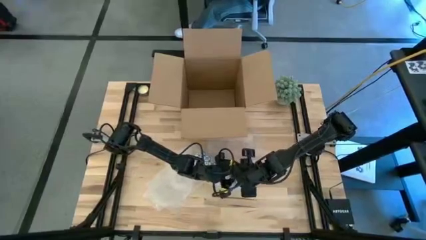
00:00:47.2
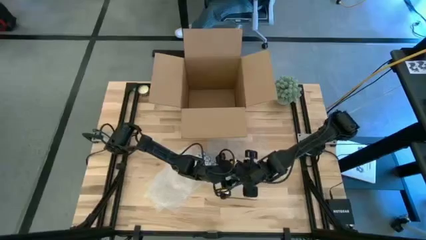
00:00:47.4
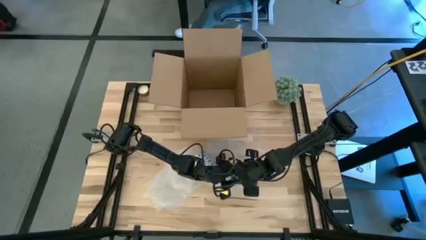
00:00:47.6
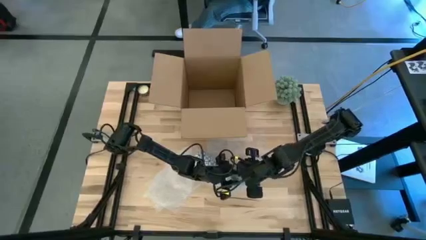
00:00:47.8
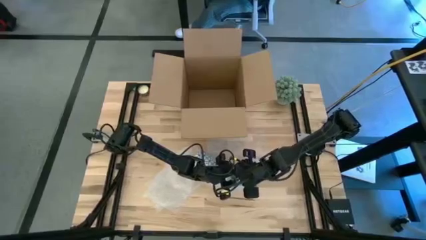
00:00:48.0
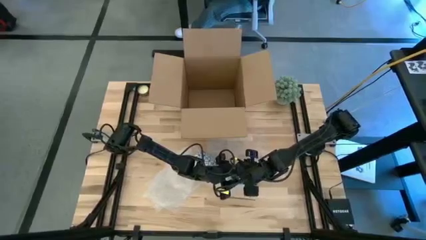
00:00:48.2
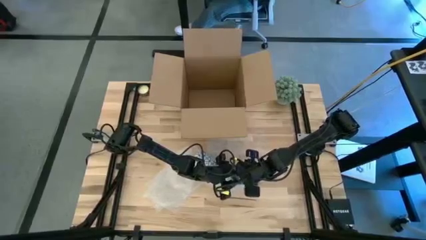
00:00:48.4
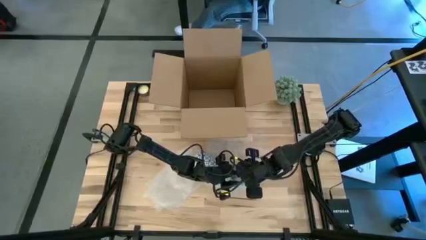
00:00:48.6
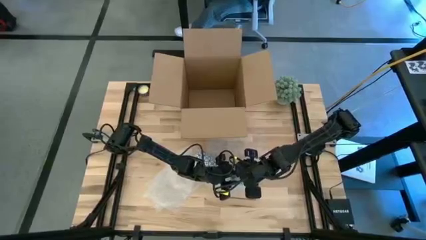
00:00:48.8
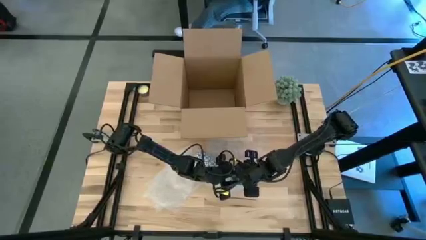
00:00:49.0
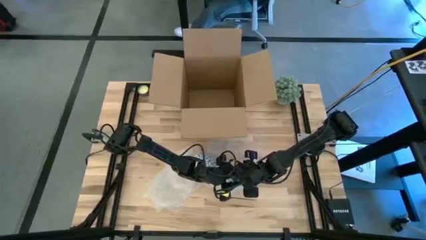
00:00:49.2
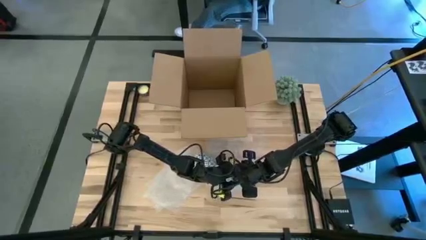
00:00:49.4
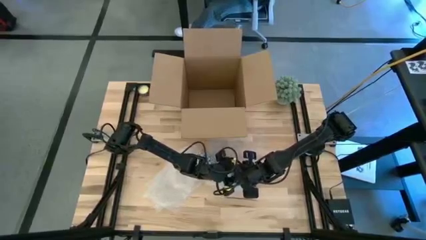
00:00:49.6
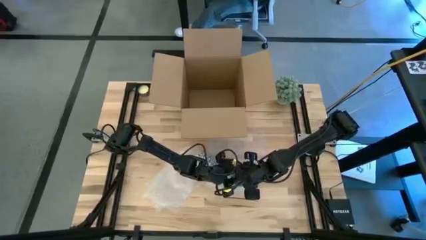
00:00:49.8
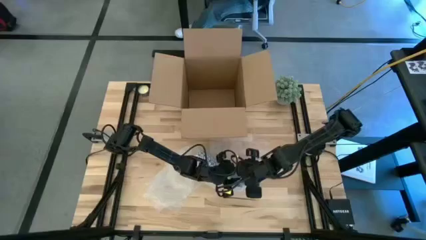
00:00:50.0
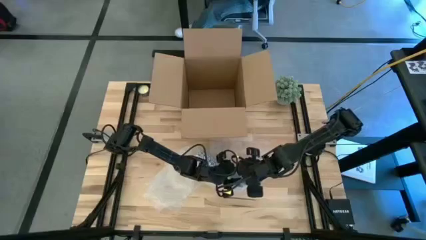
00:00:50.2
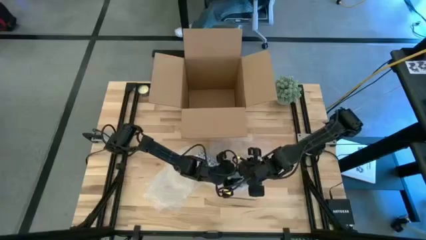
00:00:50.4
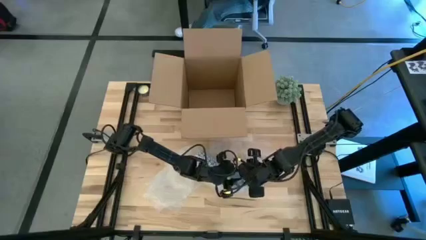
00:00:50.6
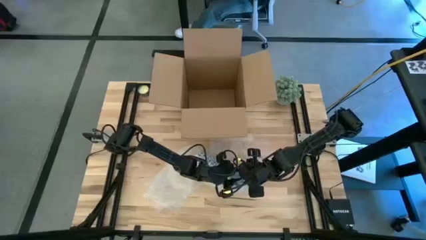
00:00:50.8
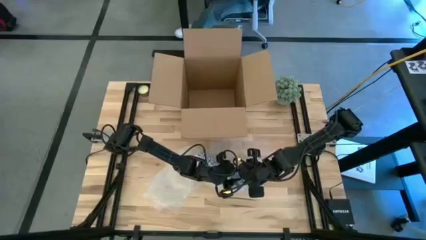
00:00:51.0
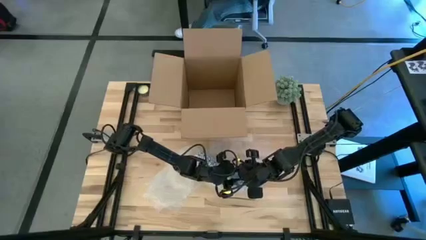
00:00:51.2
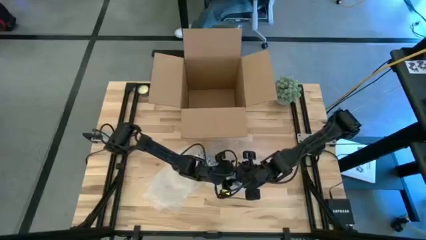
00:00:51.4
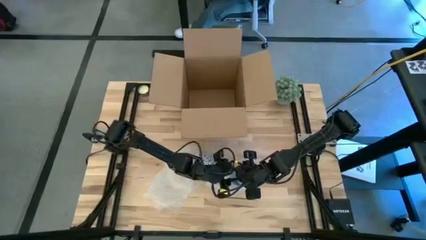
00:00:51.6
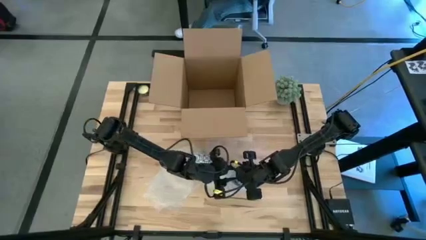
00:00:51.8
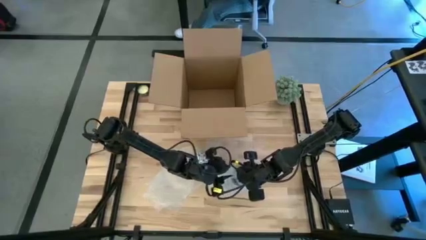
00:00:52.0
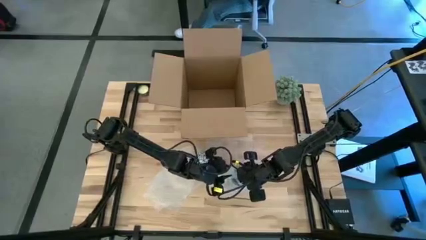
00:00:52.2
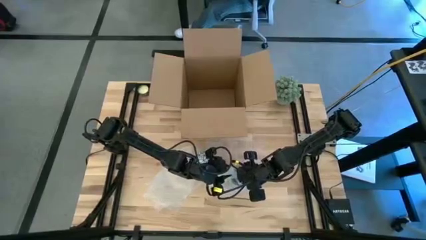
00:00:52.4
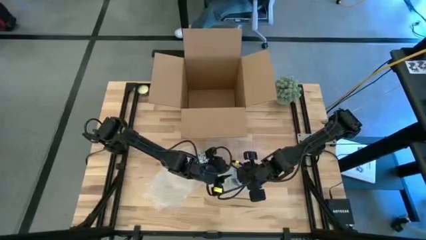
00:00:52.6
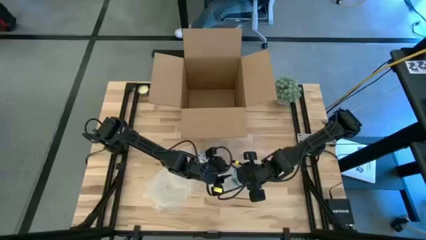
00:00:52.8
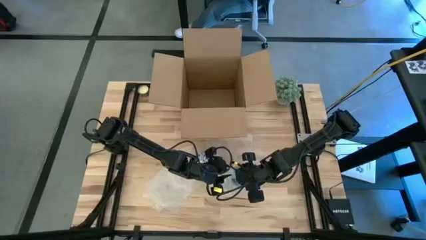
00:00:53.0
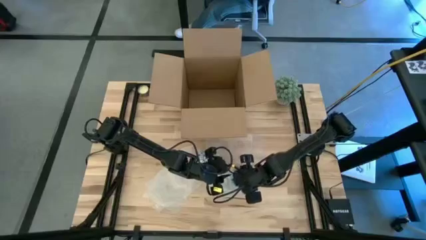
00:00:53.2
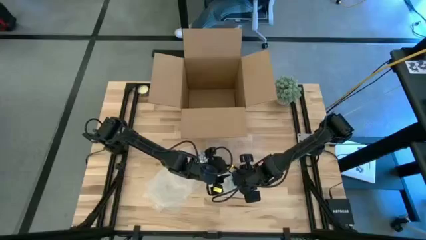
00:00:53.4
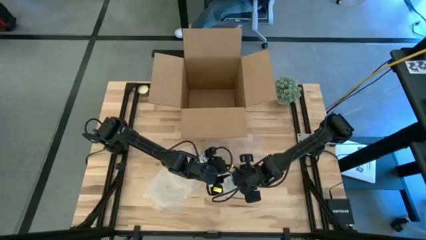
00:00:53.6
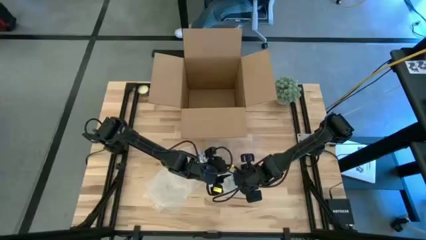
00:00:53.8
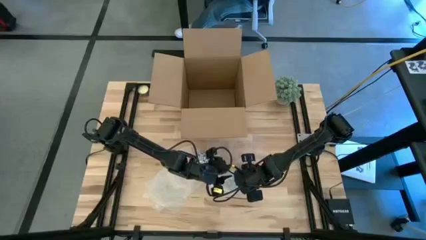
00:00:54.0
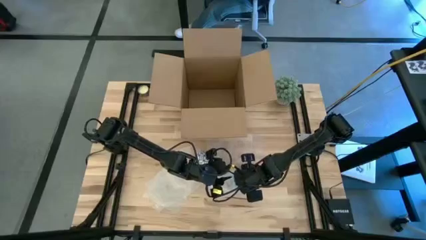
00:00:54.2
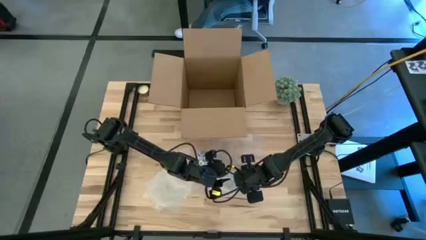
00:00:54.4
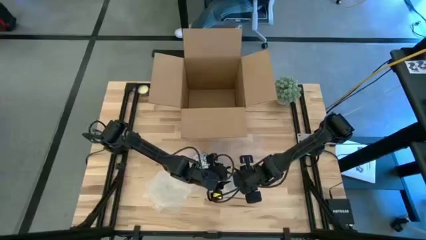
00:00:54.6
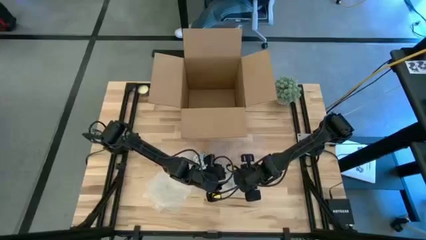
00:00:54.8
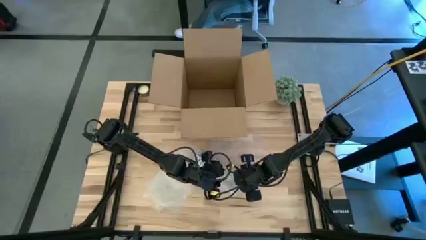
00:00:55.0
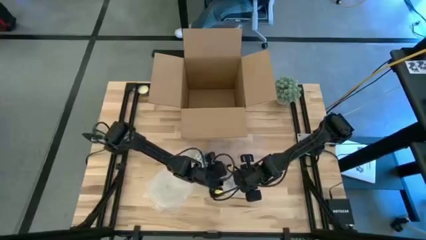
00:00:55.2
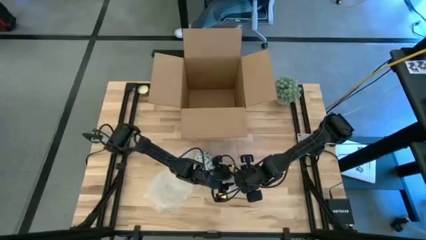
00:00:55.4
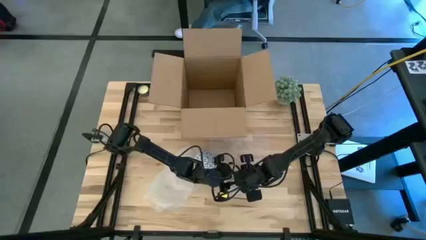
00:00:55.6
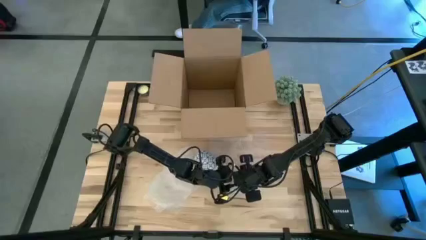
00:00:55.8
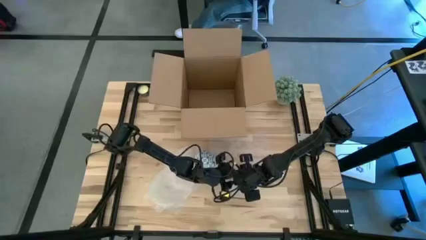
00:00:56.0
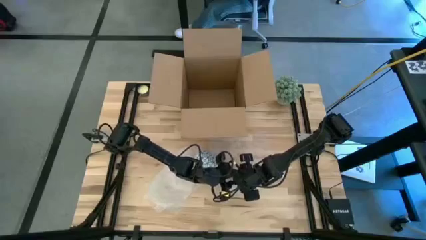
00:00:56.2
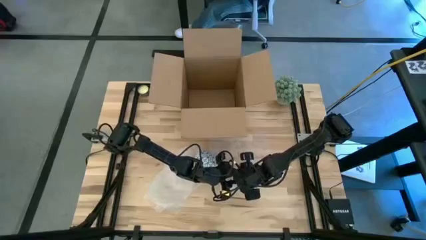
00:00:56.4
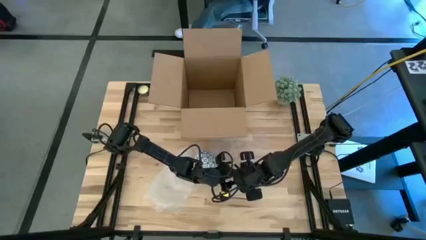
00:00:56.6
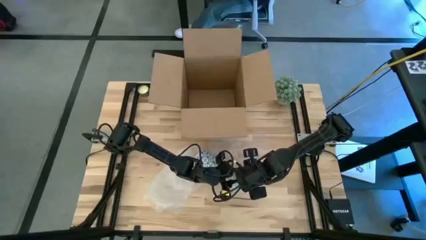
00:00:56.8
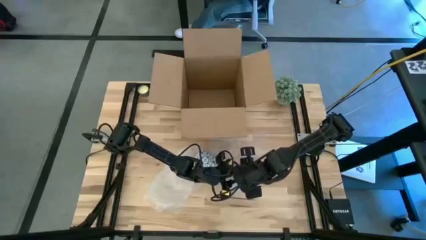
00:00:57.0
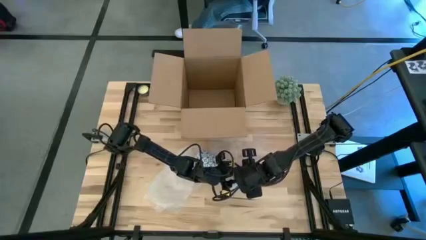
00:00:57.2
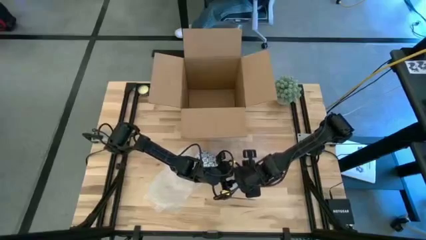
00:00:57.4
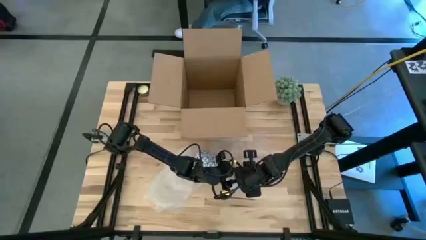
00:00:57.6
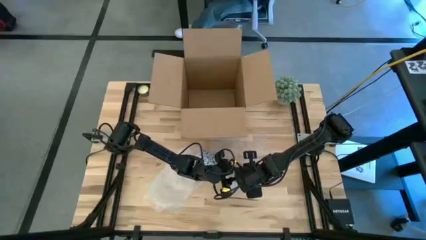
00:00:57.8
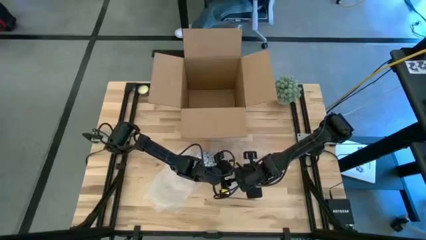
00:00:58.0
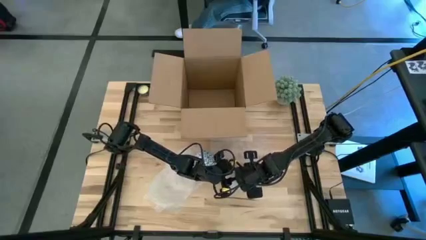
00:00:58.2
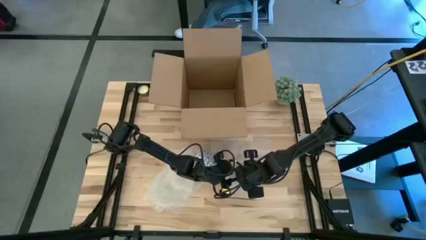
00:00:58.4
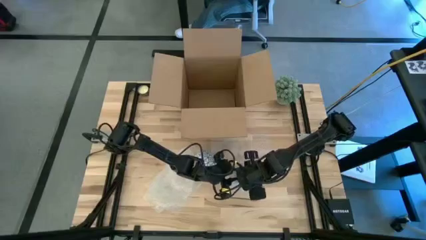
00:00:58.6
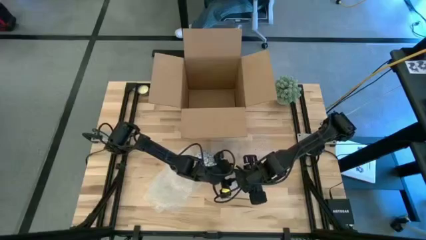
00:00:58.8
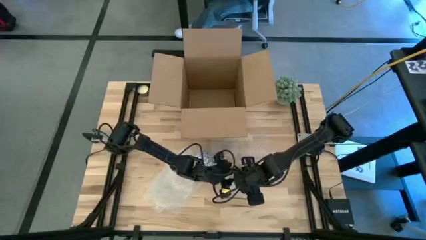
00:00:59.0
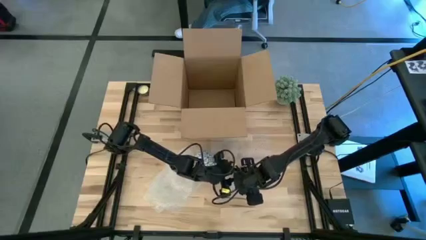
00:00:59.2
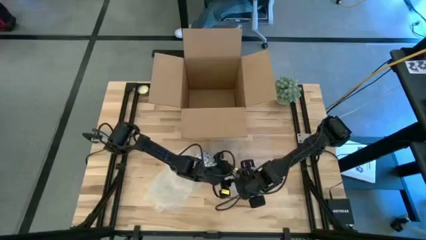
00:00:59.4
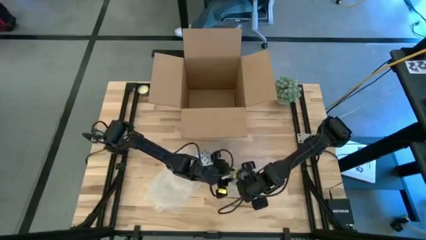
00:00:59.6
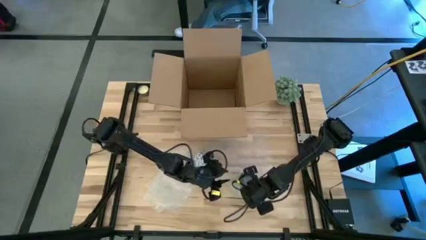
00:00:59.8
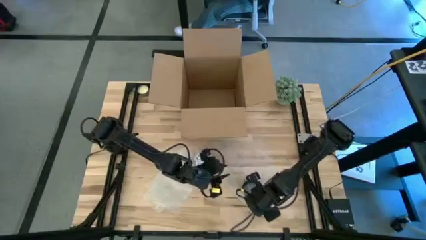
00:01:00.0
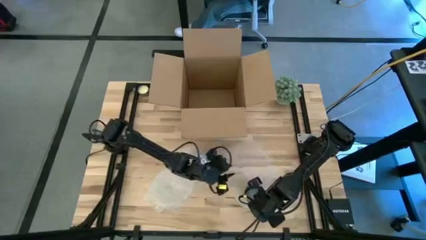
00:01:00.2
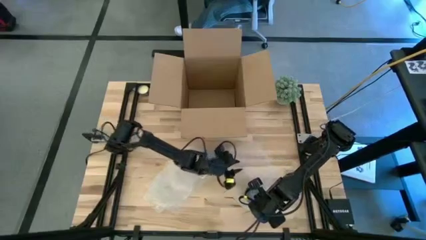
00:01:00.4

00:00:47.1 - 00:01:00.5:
Task: wrap mug
Wrap the green mug with the right transparent bubble wrap

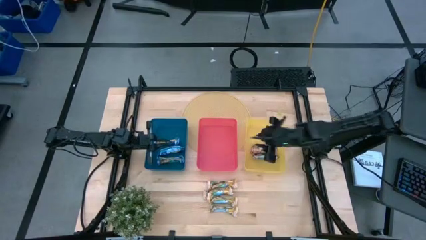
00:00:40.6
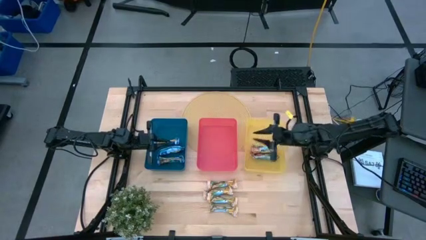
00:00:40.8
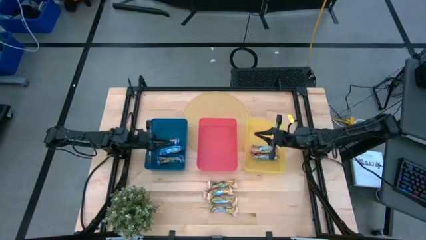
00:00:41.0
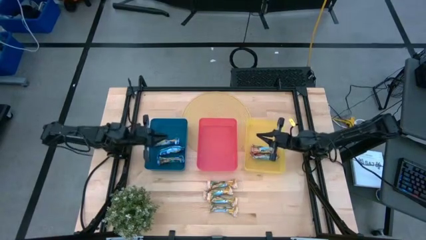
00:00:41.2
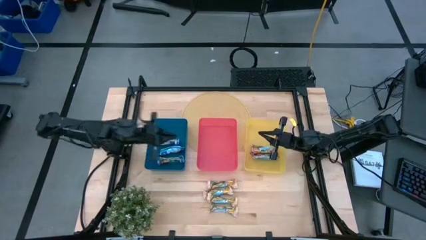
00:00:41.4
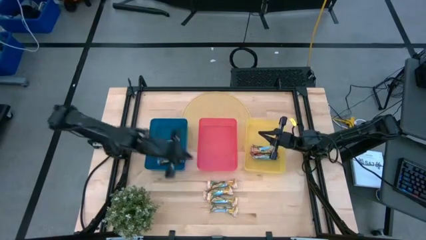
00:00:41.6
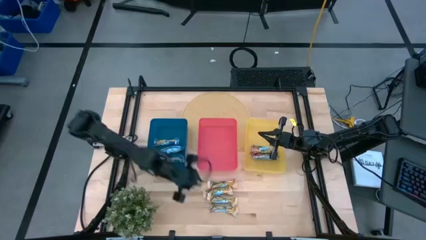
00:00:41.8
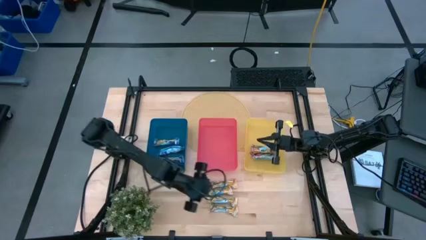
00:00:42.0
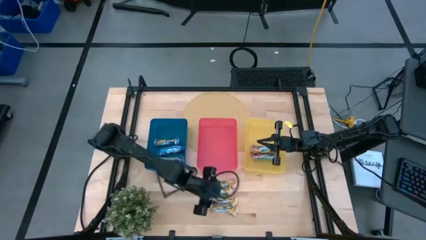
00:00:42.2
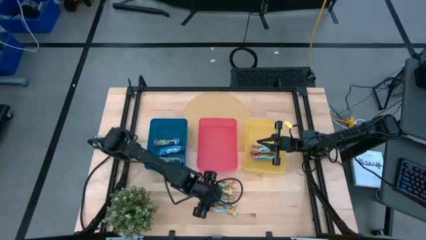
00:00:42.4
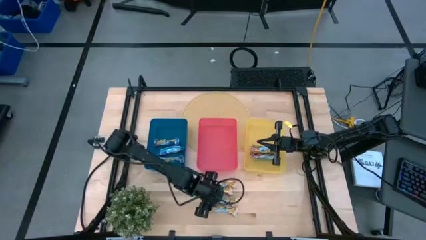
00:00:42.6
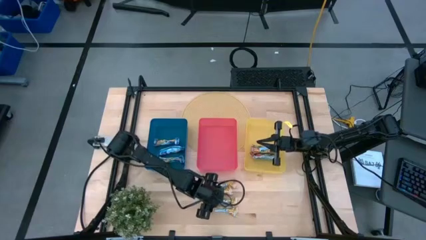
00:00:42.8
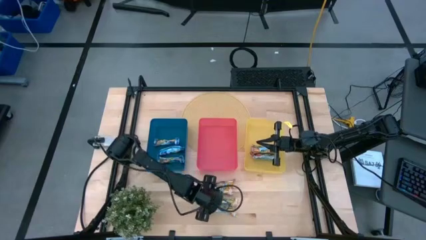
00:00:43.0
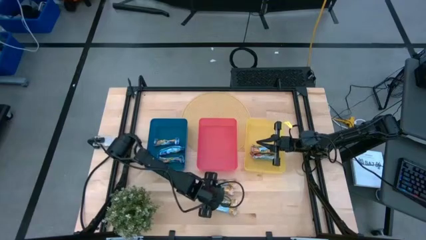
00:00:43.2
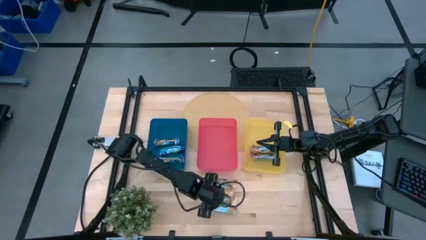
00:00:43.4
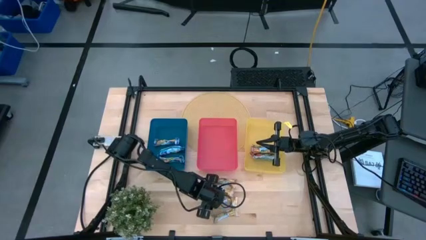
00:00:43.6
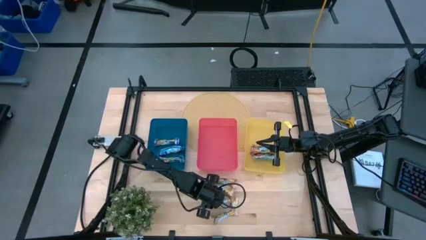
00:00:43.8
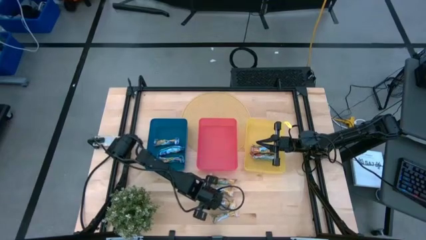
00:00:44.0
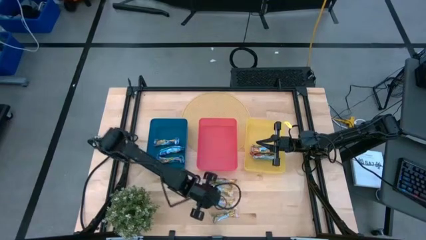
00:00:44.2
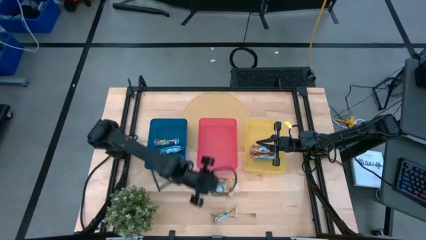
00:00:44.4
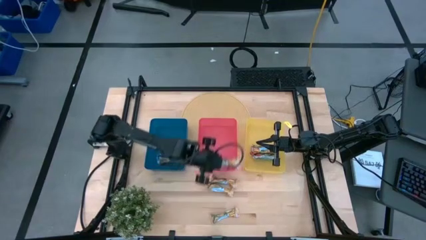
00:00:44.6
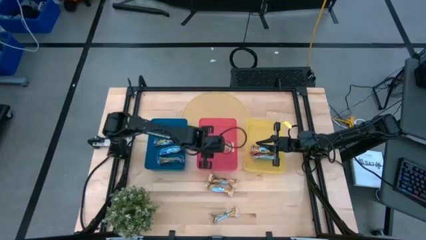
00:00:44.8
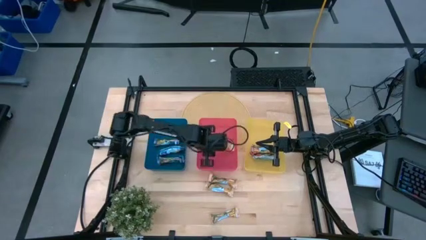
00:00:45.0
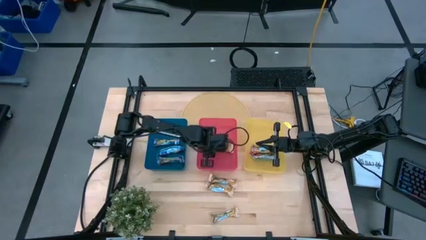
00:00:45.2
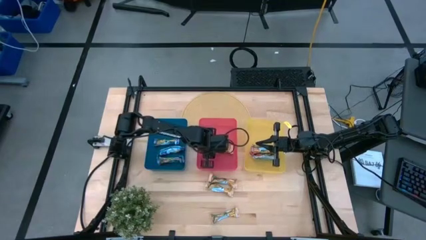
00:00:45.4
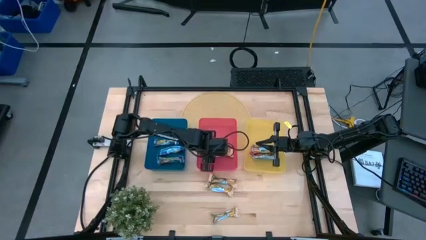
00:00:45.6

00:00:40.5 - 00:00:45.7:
Task: Pick and place Granola Bars by type
Put the yellow granola bar into pink bin
